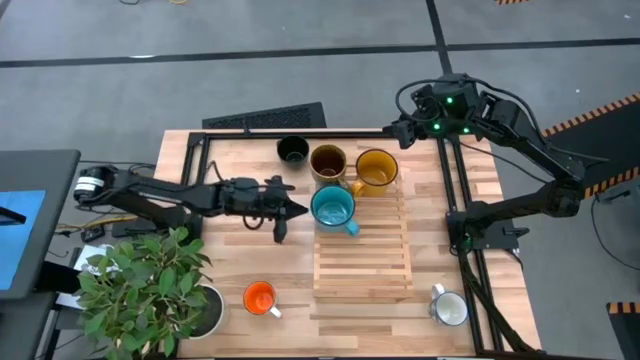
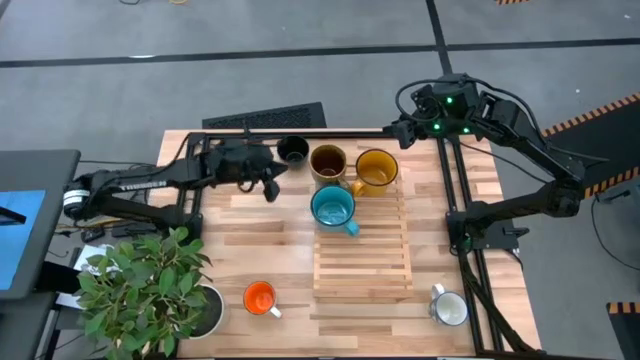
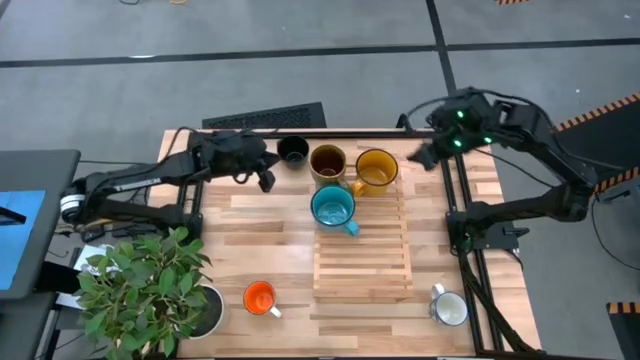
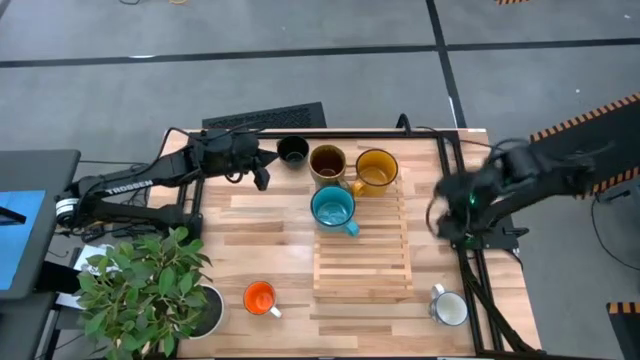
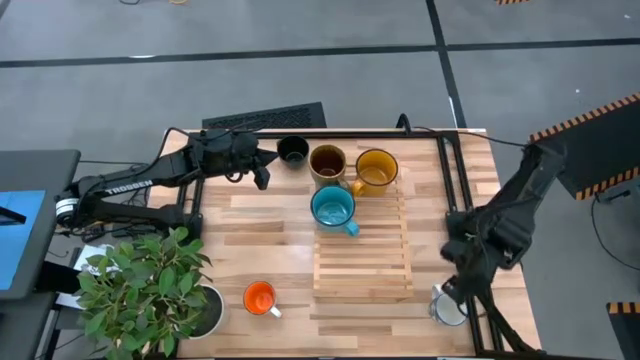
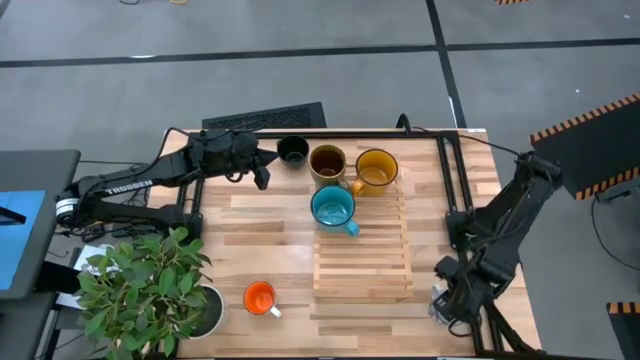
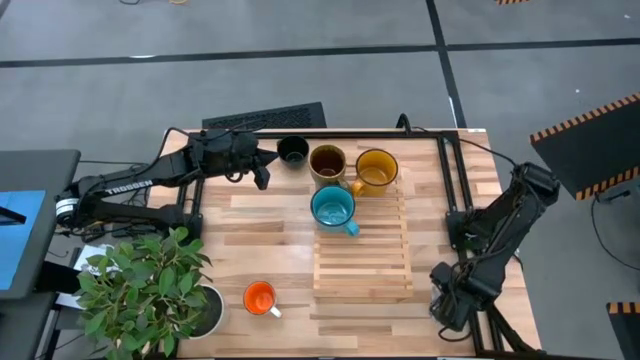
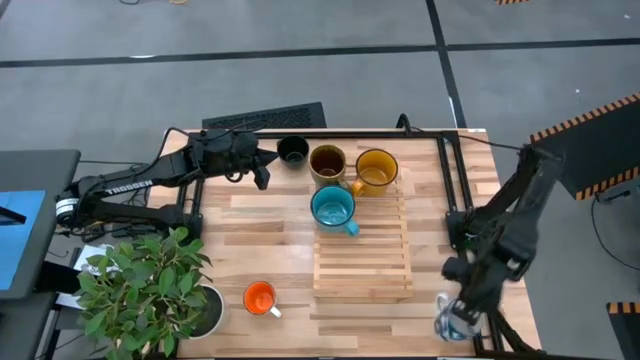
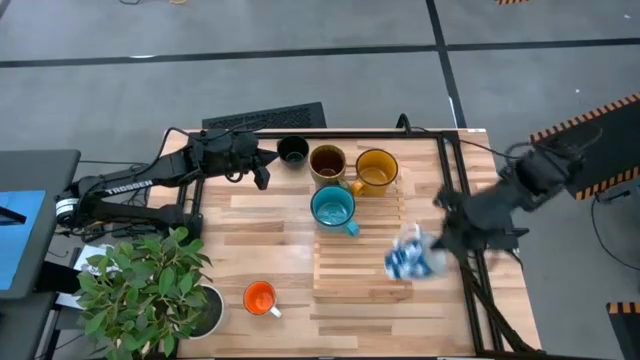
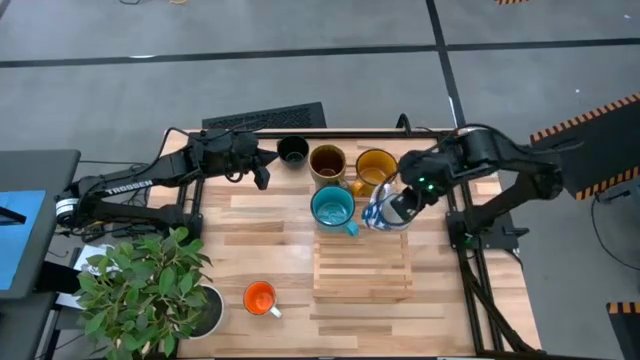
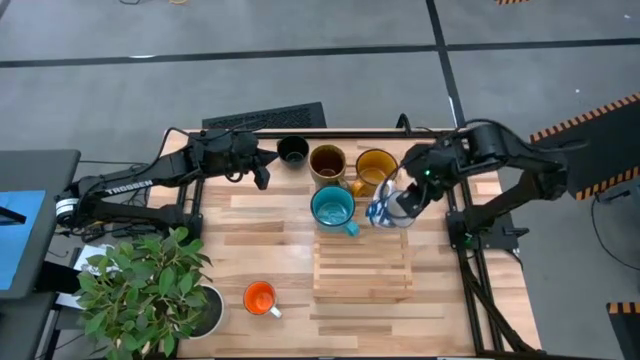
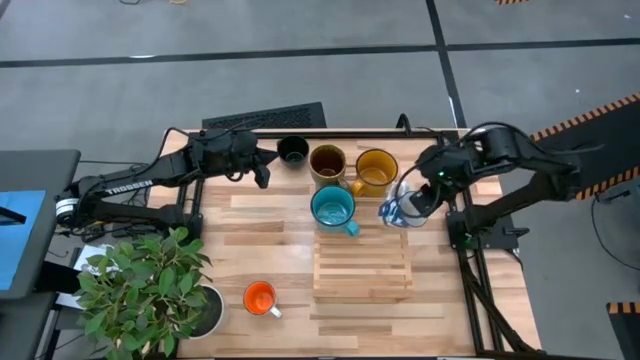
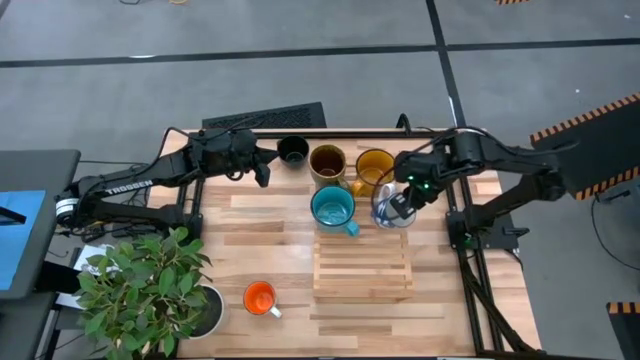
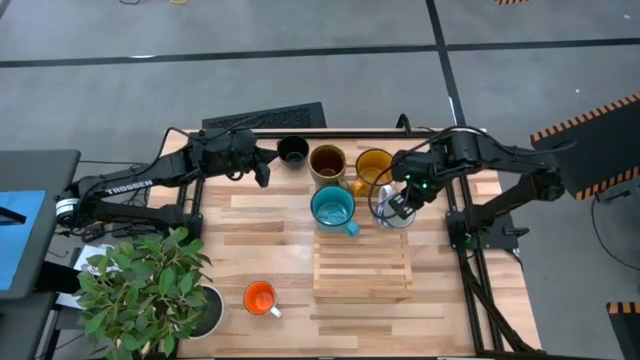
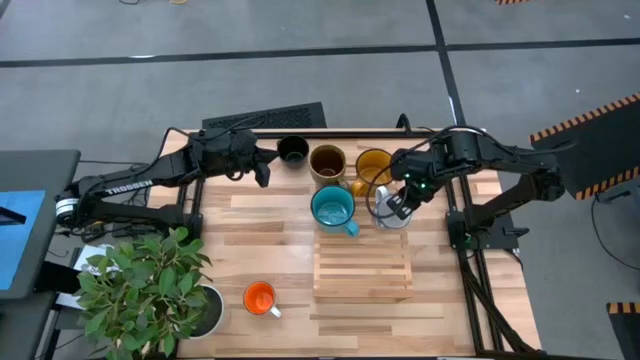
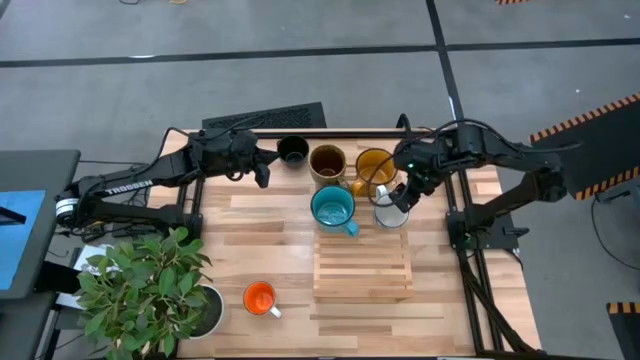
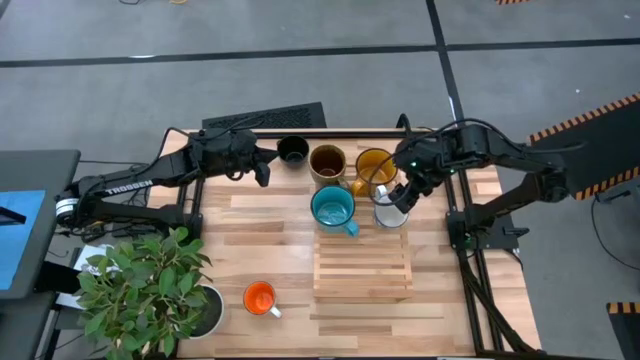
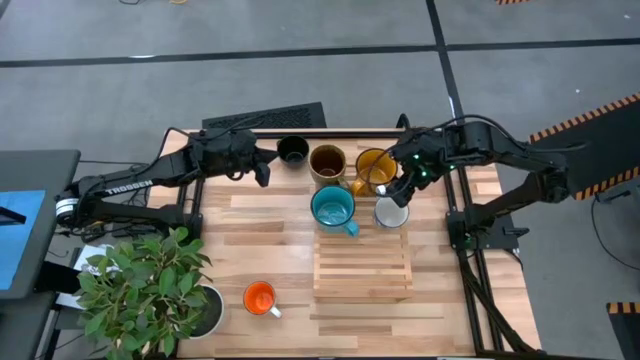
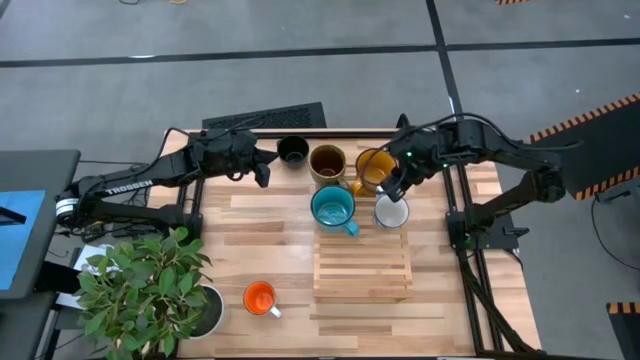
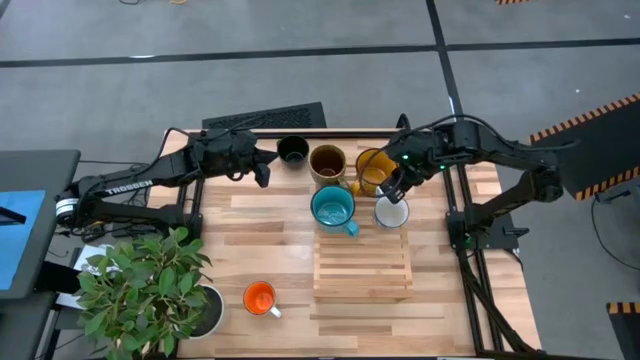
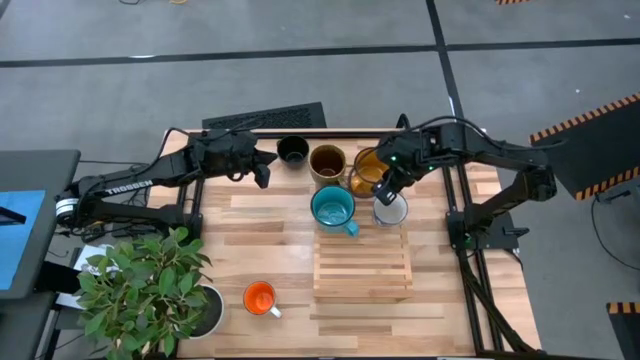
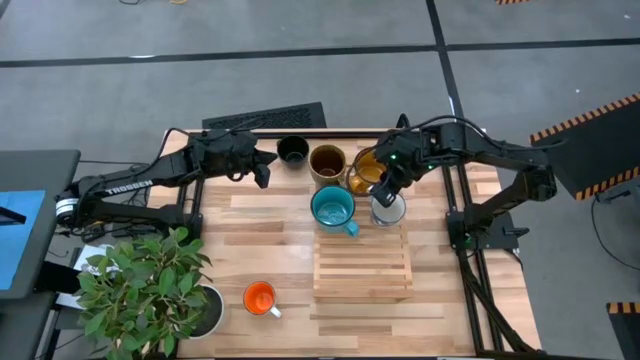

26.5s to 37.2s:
Task: Place coffee mugs
Put the white blue mug on the shelf

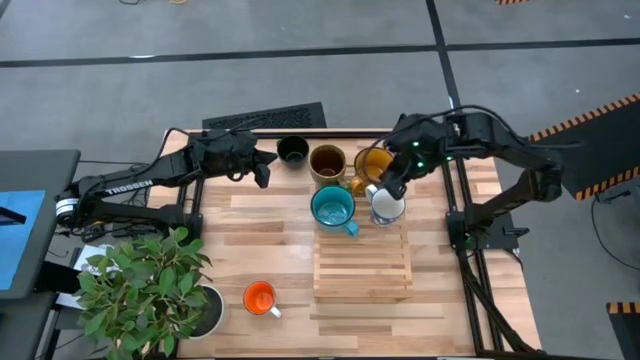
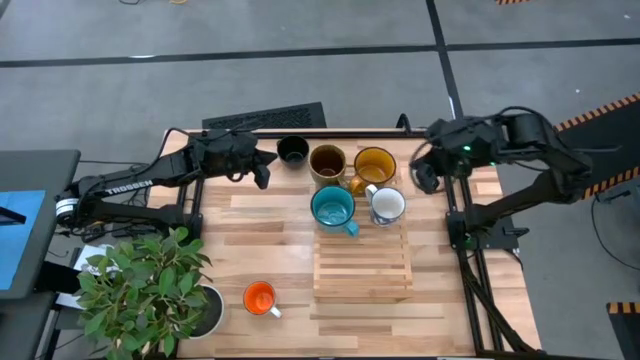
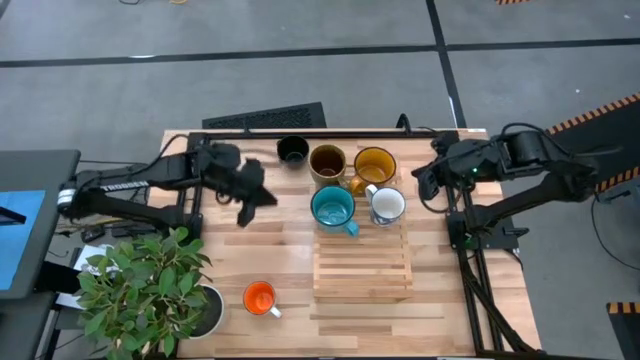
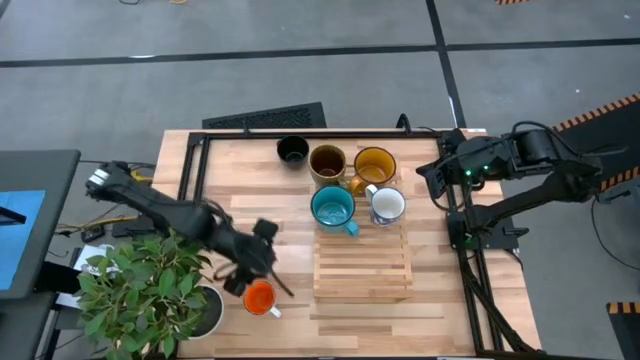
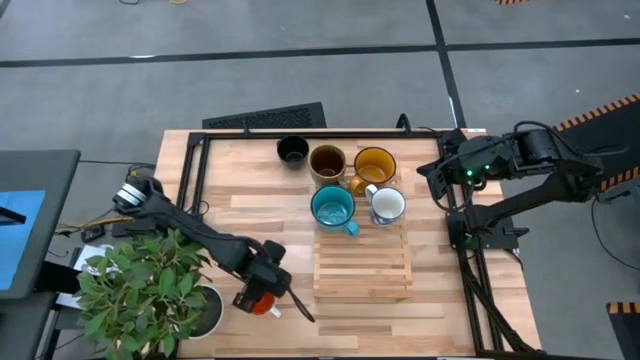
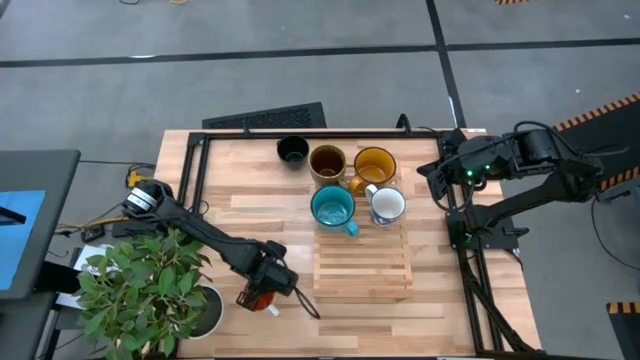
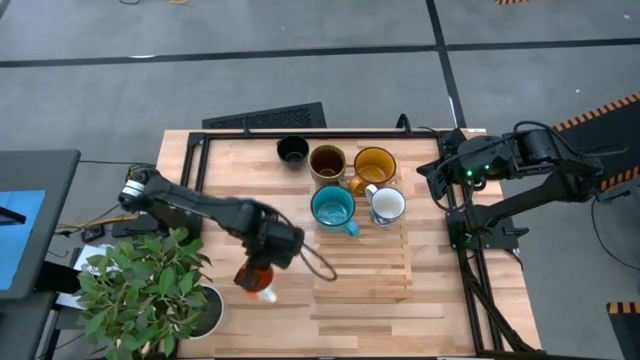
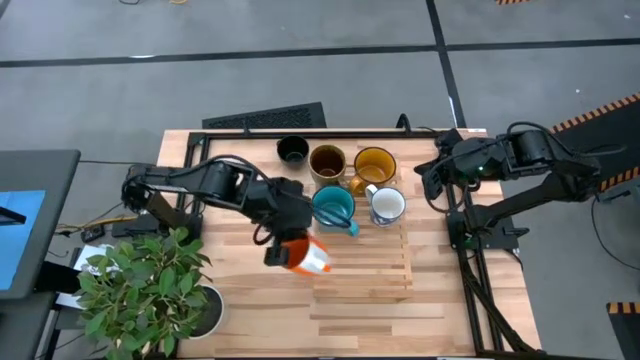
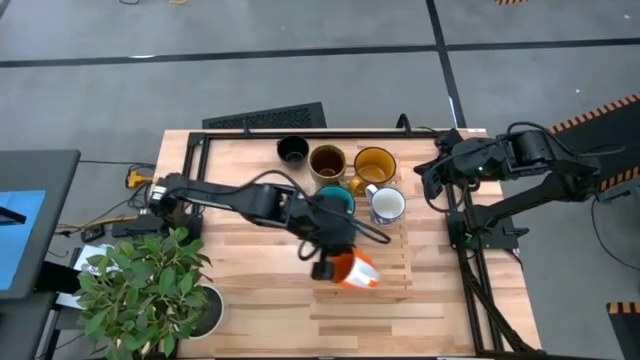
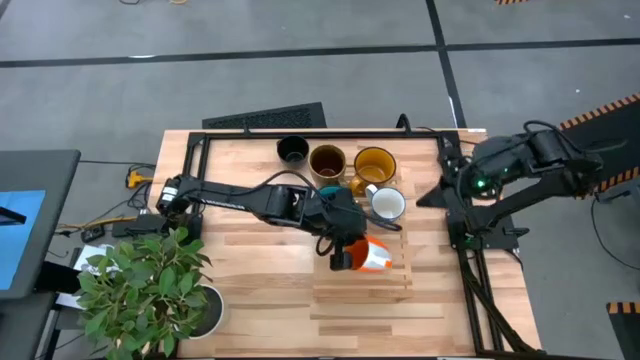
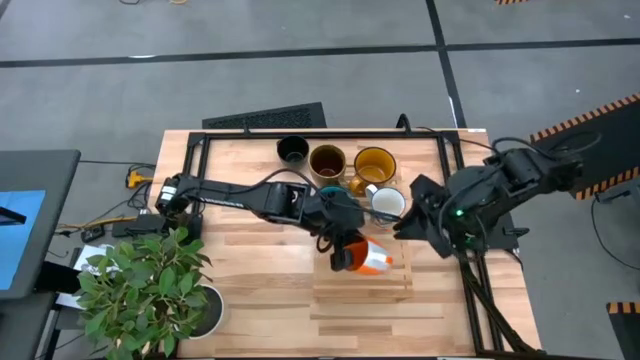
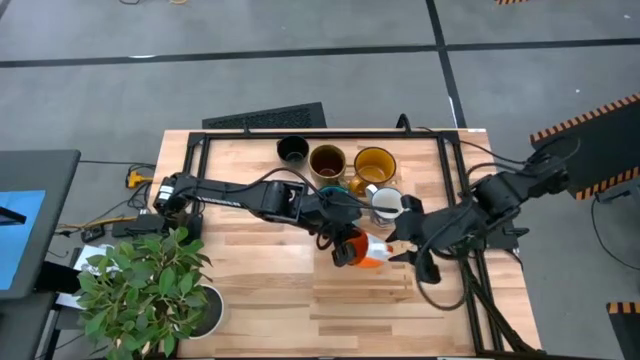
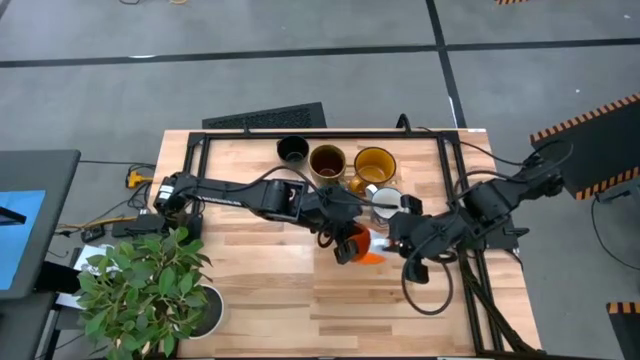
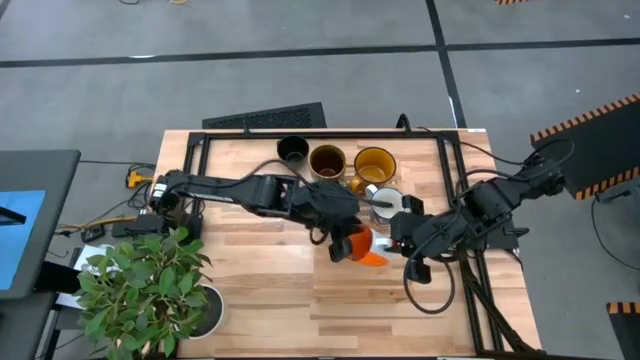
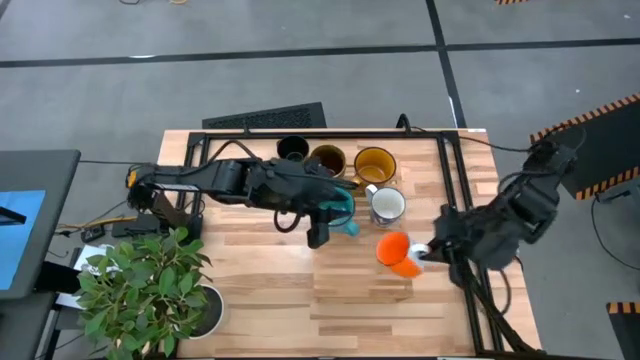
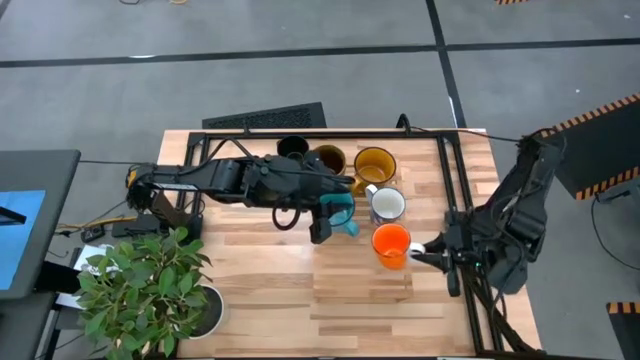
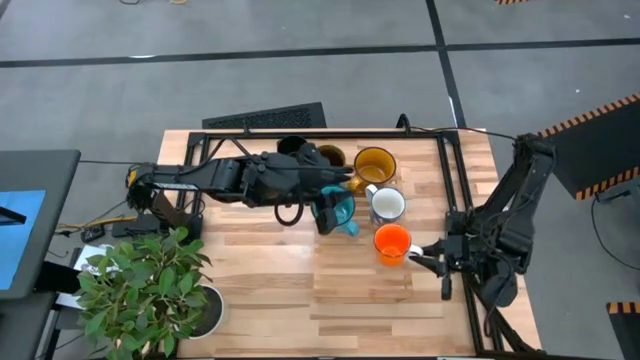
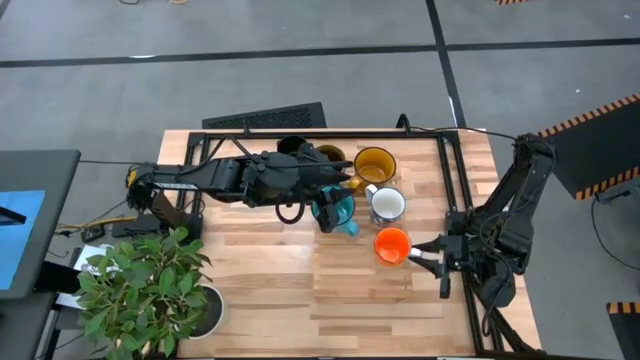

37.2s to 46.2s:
Put the orange mug on the shelf

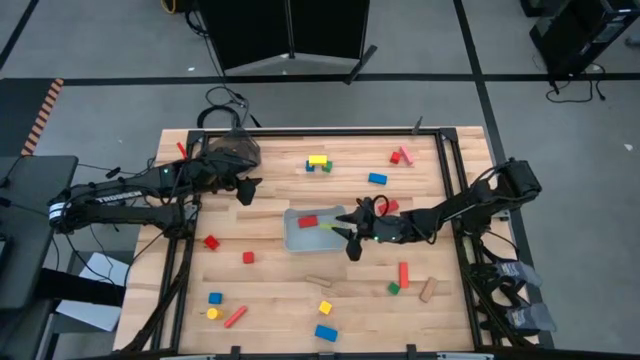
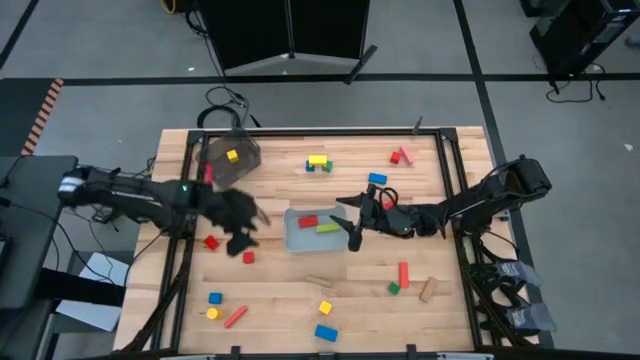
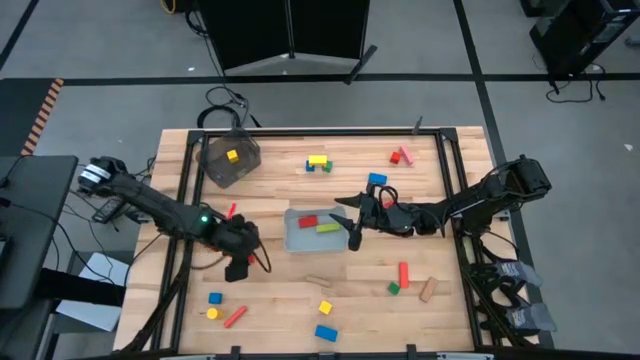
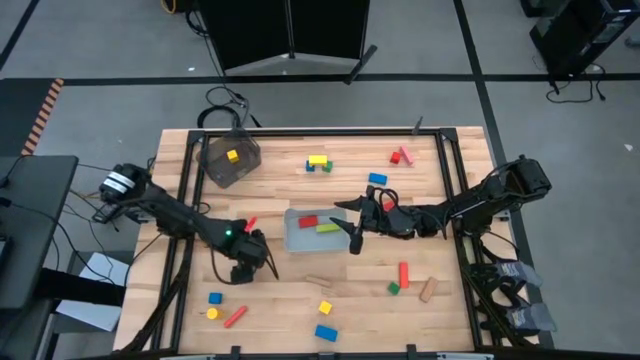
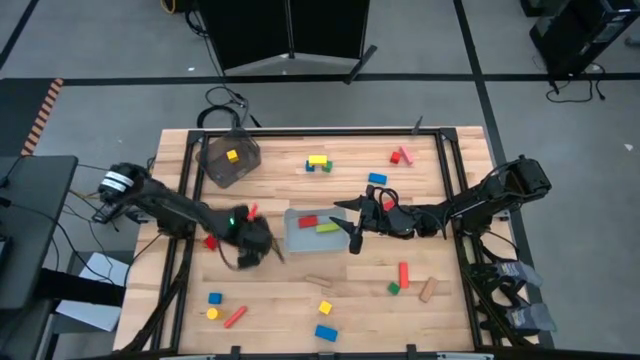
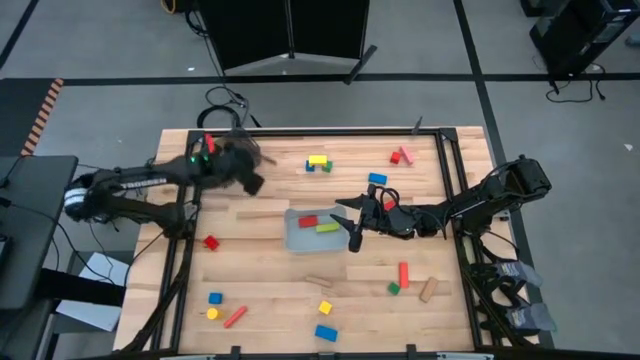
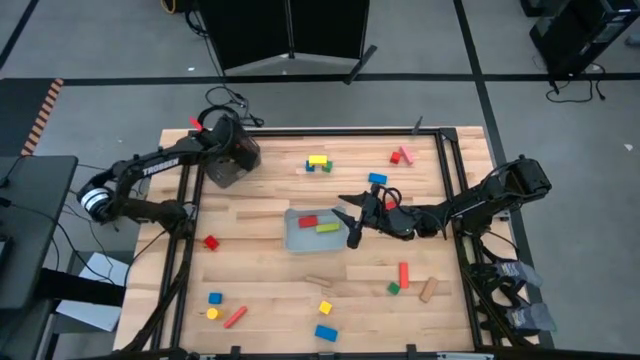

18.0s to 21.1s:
Task: Sort blocks by size
Put the bottom red cube block into the black bin
